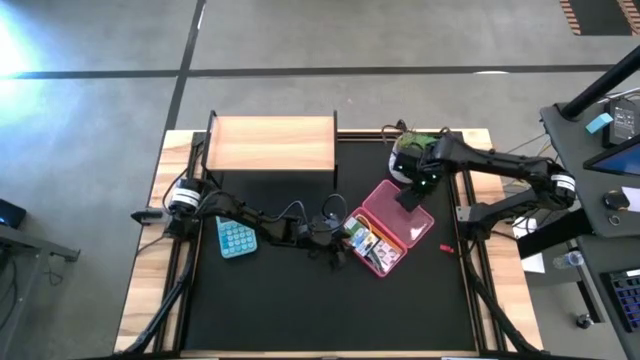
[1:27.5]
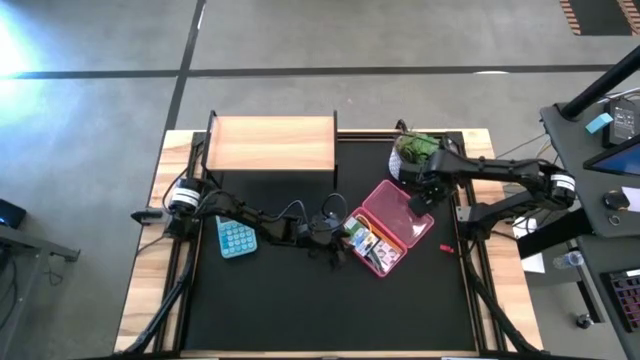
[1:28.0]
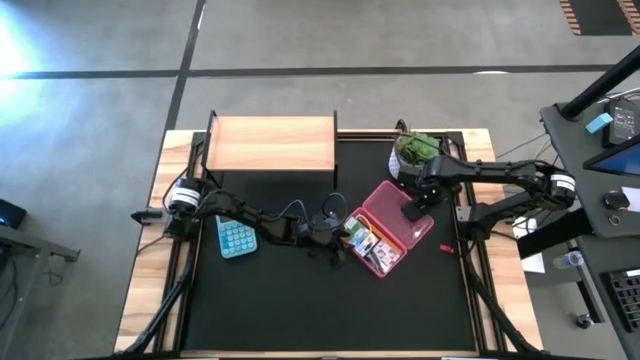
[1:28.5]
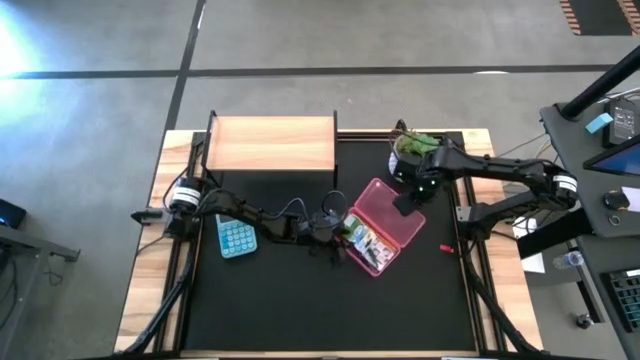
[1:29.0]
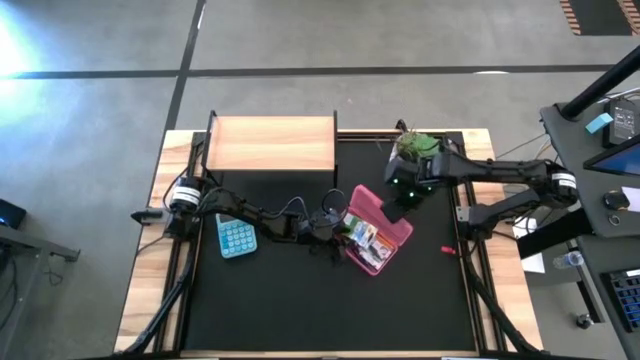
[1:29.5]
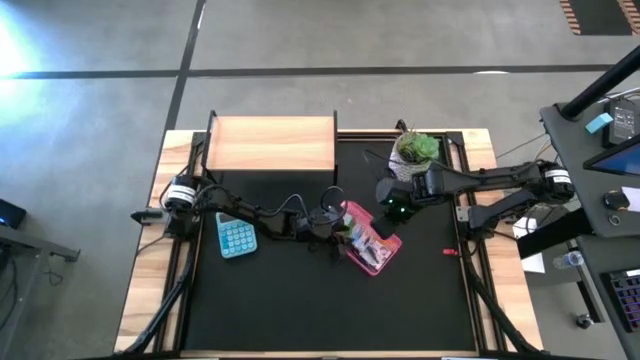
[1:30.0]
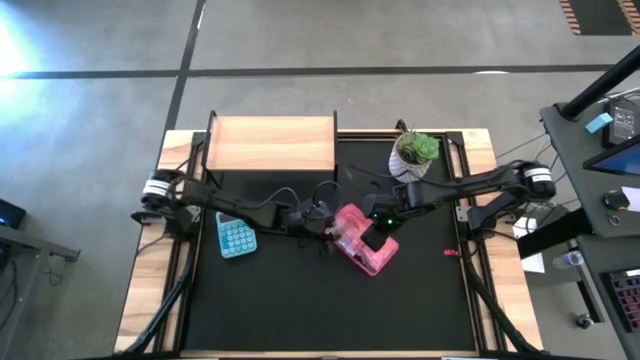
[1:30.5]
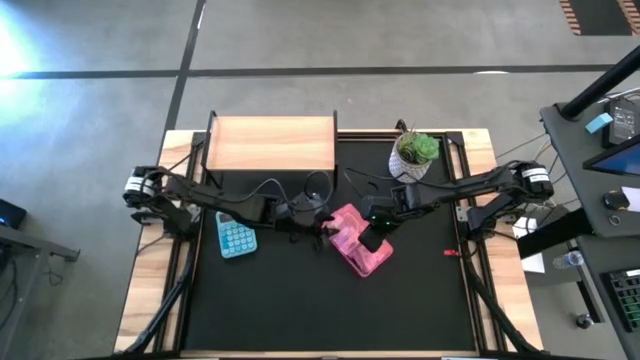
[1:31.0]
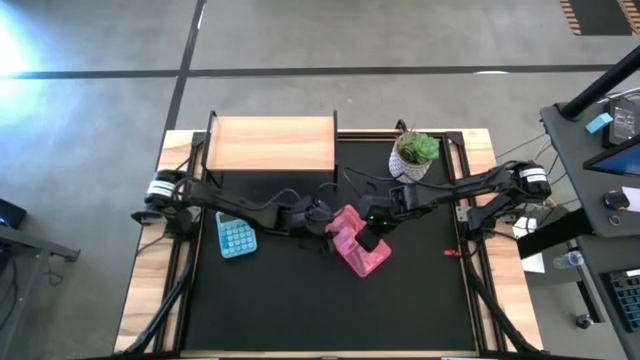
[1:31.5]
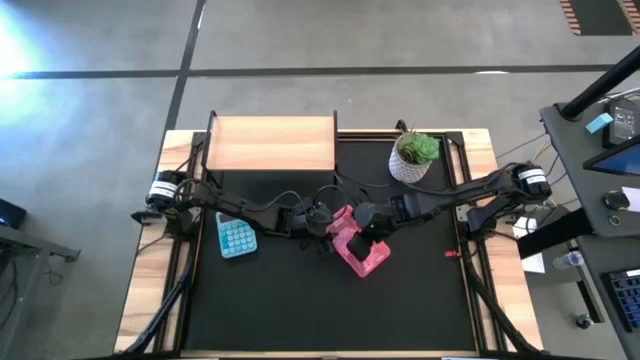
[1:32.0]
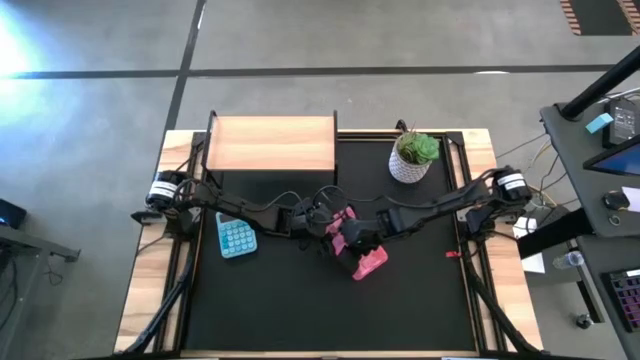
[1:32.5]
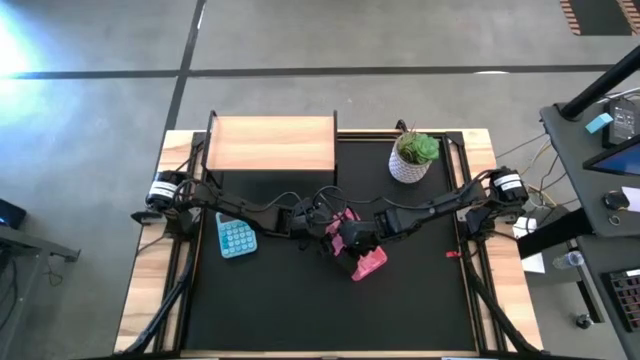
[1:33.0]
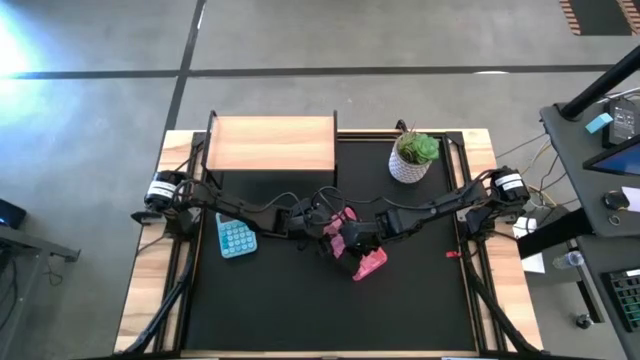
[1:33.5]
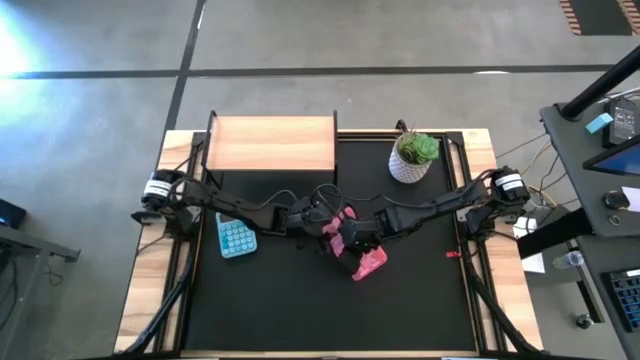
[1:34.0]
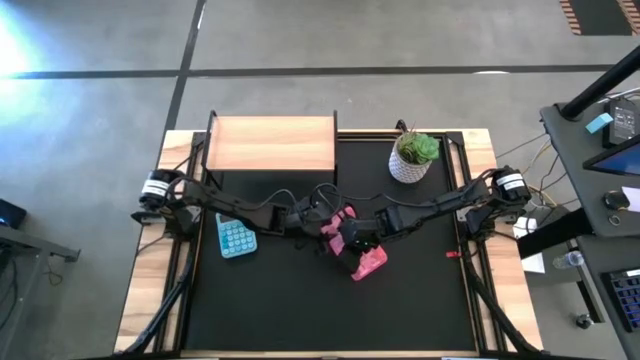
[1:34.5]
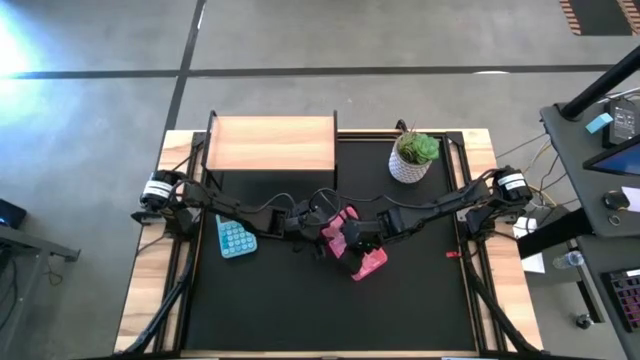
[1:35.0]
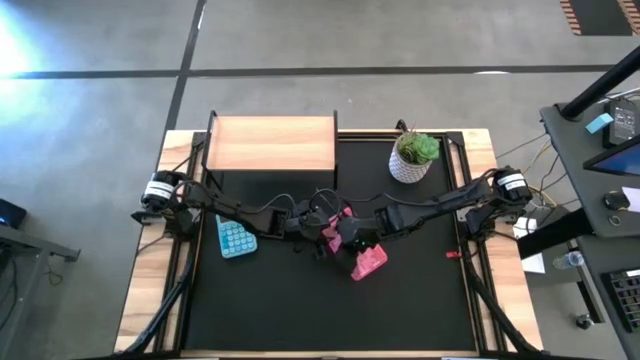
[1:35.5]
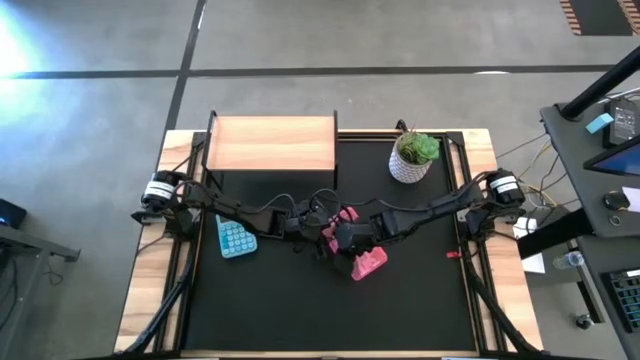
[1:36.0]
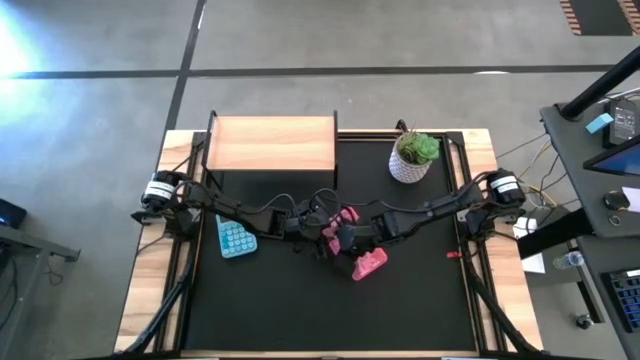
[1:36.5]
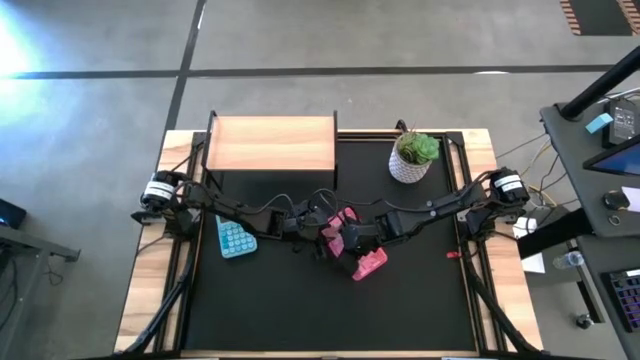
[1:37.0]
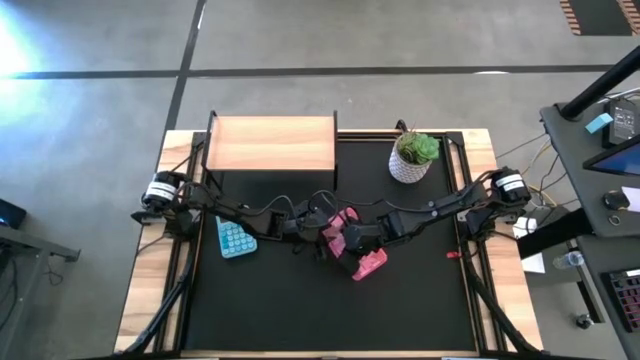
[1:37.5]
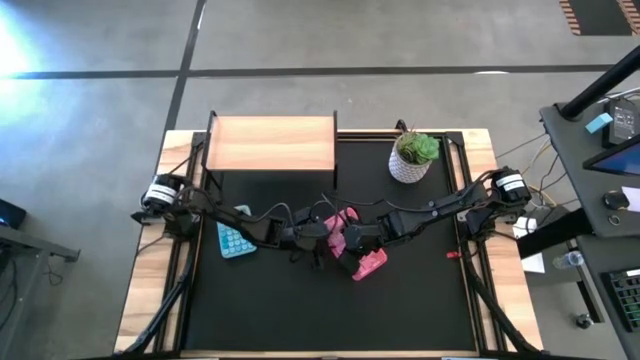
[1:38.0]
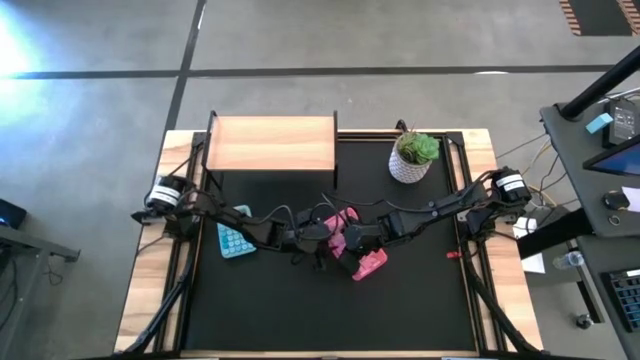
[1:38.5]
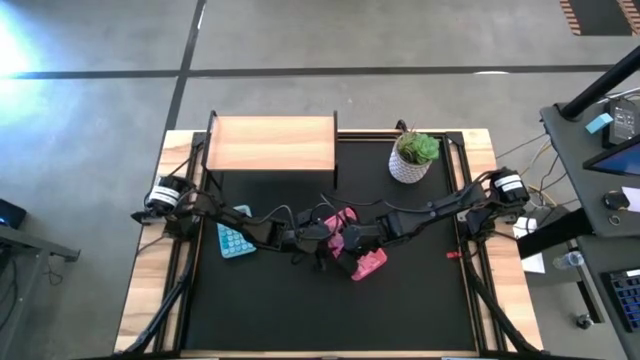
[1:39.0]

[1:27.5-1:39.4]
Task: Pack school essentials
Close the pink supply box

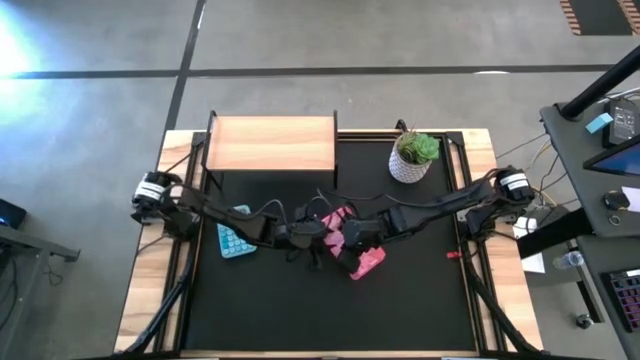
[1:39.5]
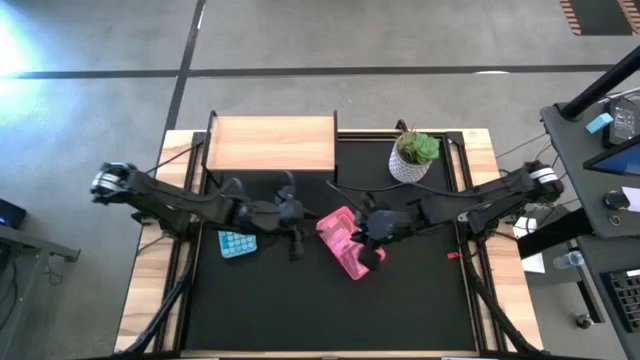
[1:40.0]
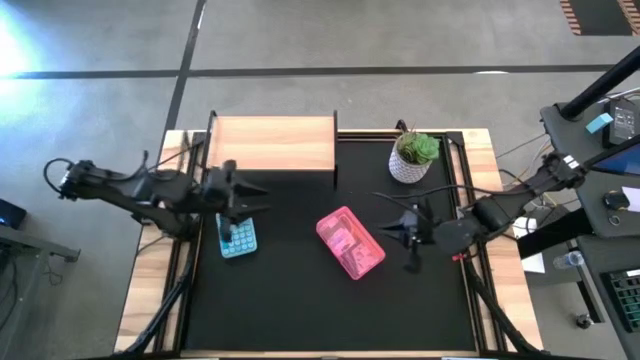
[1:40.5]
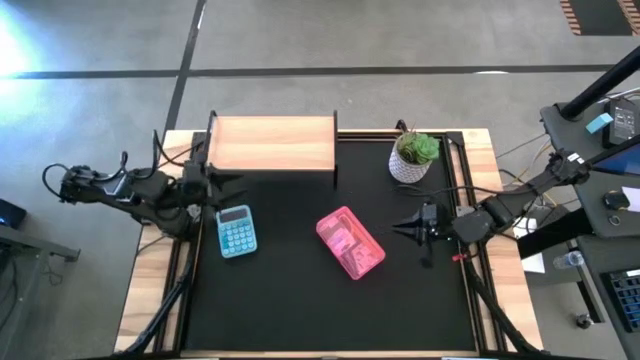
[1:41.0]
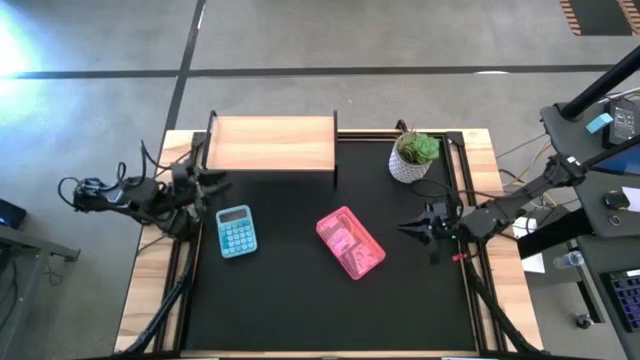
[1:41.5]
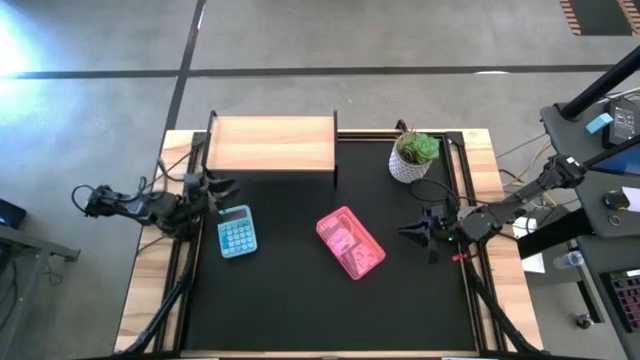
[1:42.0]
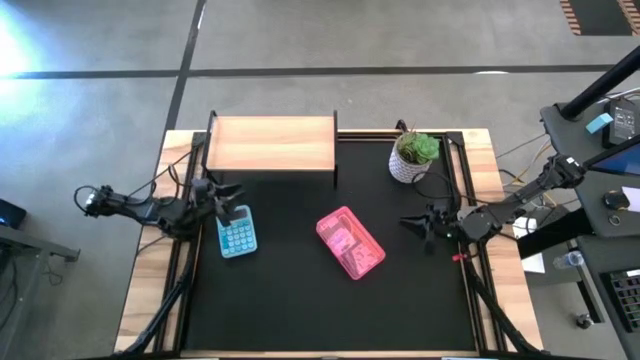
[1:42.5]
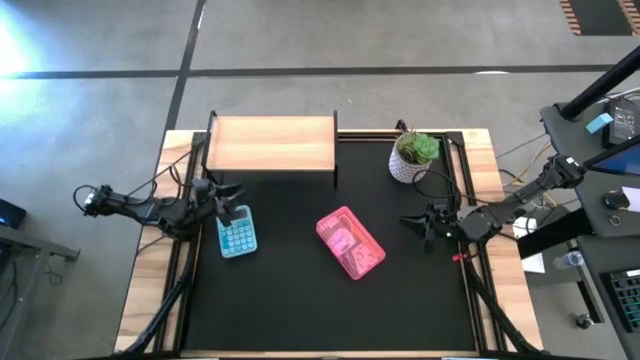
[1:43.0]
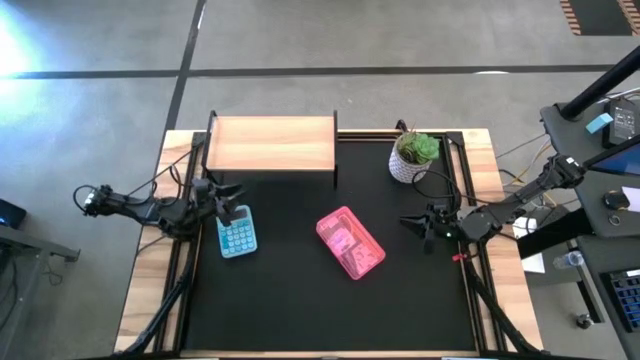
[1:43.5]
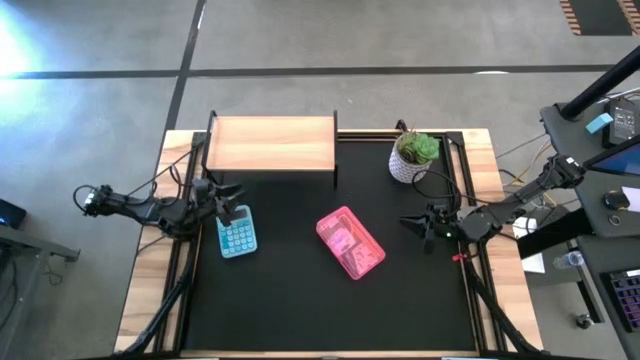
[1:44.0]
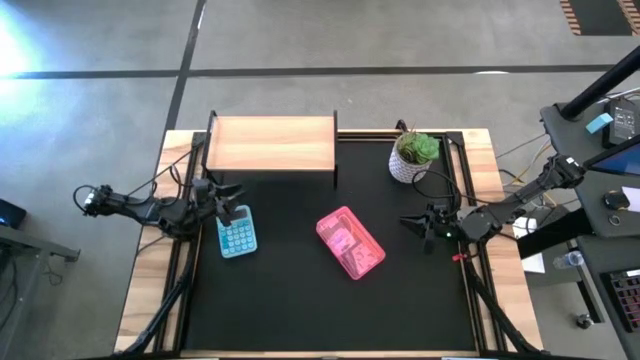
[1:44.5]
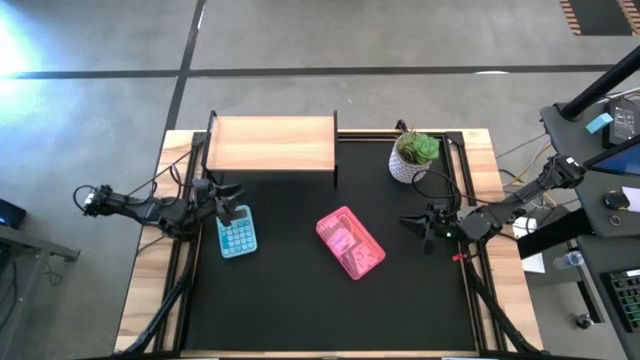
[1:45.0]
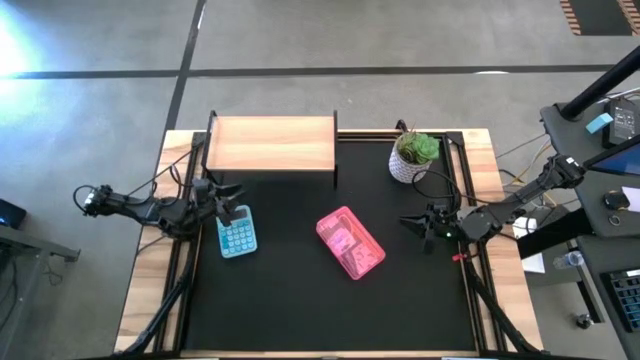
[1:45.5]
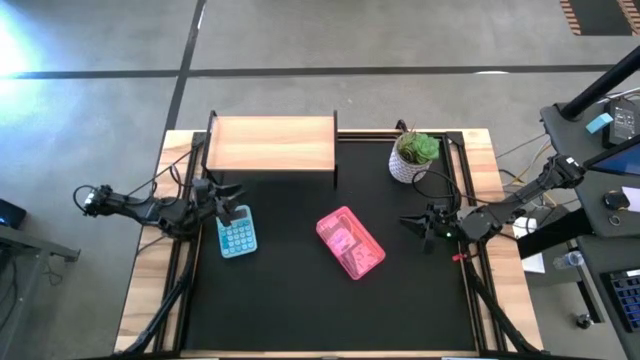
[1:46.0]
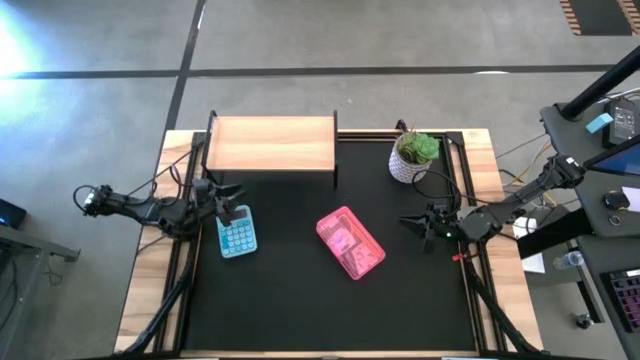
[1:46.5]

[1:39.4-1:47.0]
Return to Home Position
